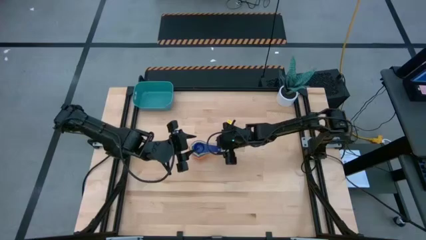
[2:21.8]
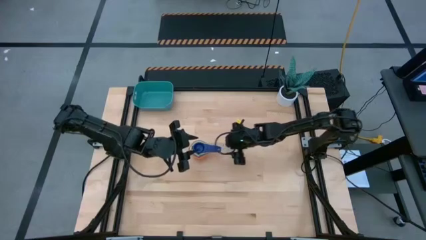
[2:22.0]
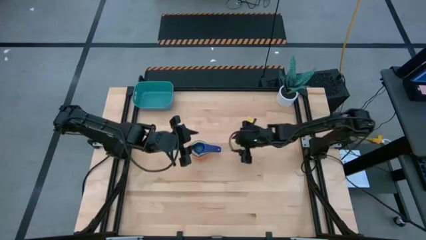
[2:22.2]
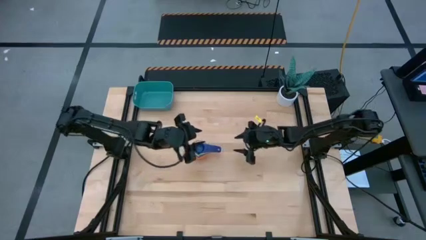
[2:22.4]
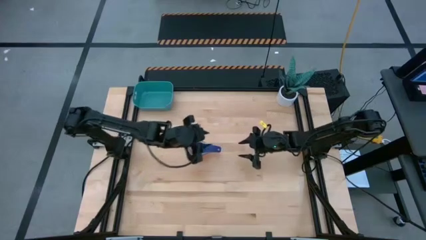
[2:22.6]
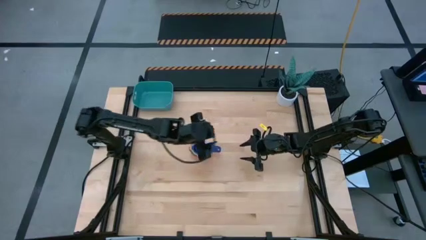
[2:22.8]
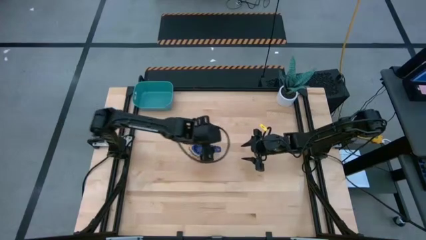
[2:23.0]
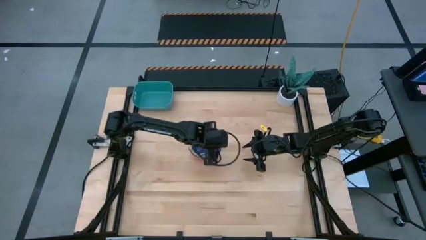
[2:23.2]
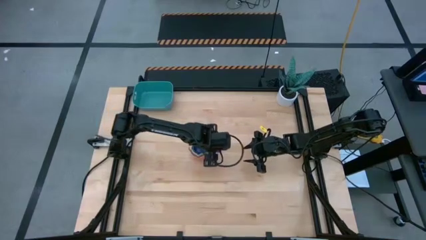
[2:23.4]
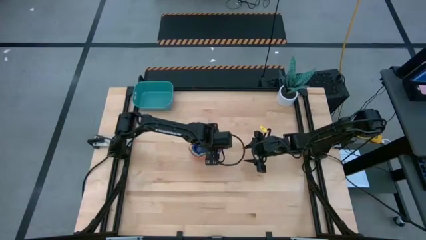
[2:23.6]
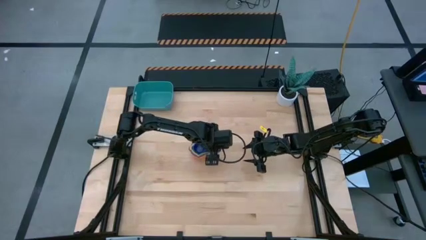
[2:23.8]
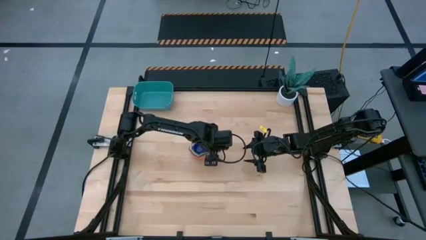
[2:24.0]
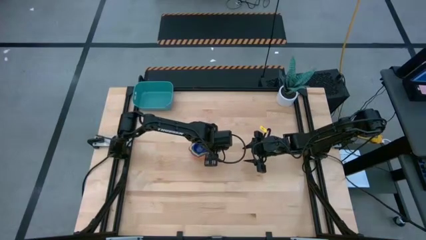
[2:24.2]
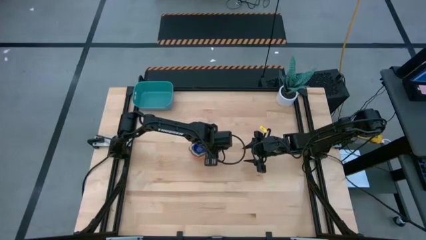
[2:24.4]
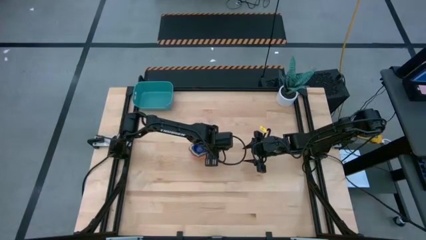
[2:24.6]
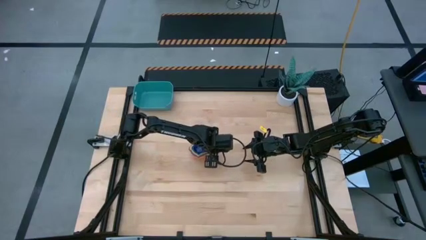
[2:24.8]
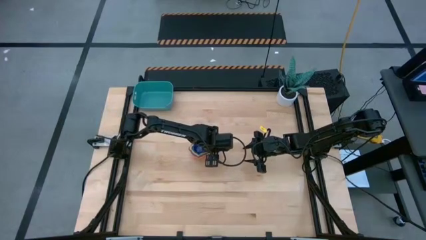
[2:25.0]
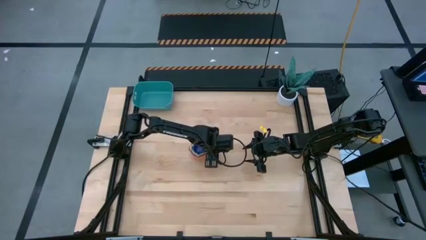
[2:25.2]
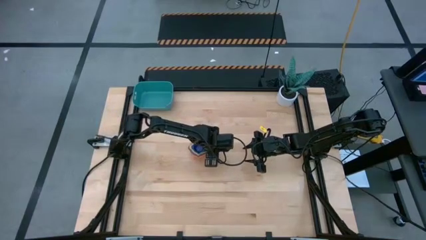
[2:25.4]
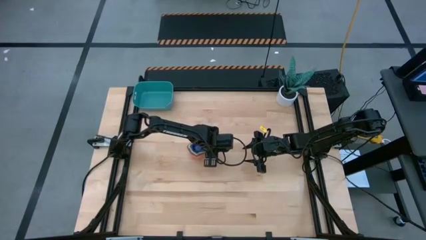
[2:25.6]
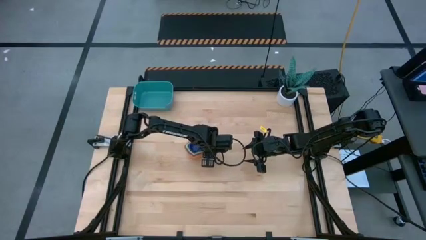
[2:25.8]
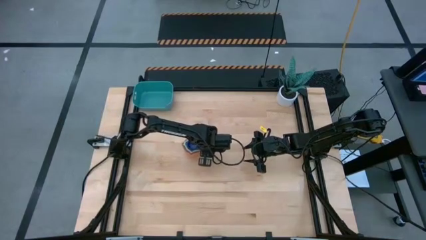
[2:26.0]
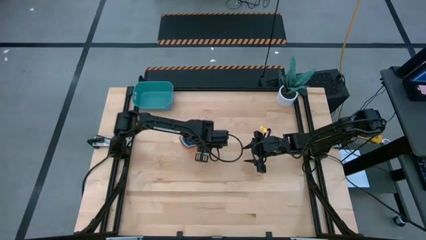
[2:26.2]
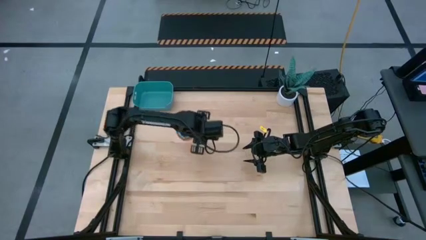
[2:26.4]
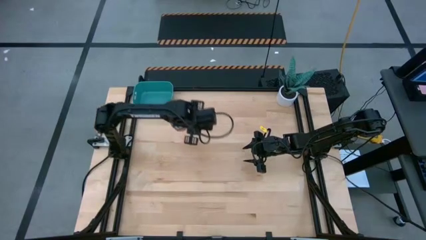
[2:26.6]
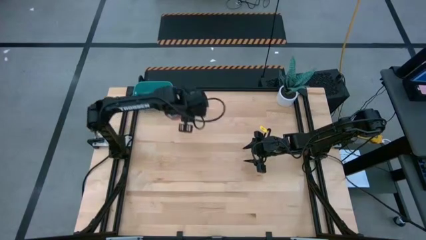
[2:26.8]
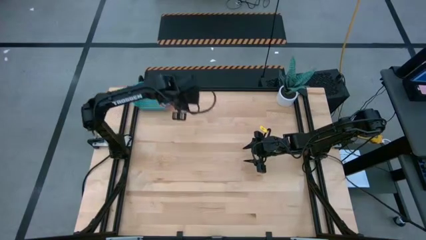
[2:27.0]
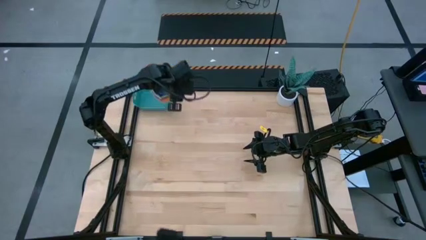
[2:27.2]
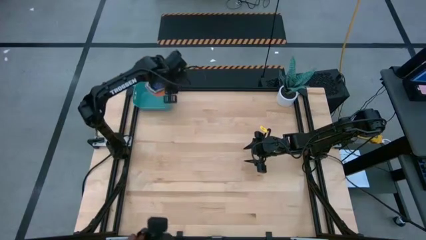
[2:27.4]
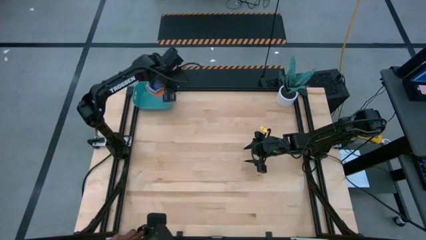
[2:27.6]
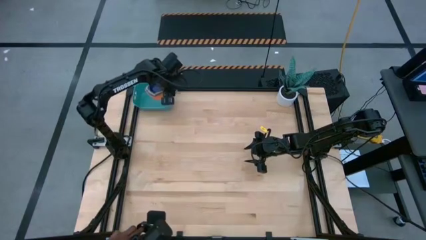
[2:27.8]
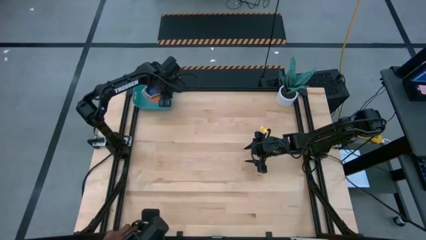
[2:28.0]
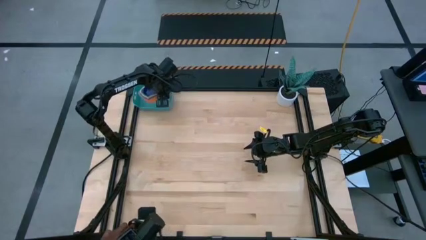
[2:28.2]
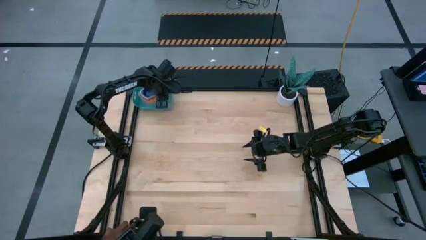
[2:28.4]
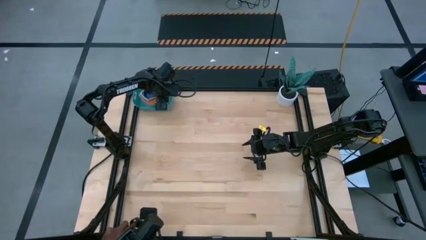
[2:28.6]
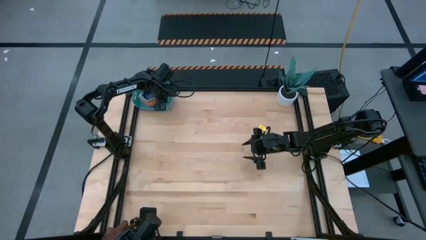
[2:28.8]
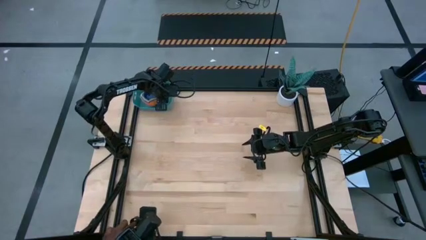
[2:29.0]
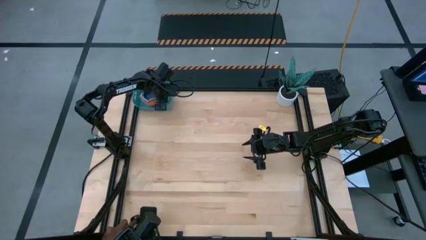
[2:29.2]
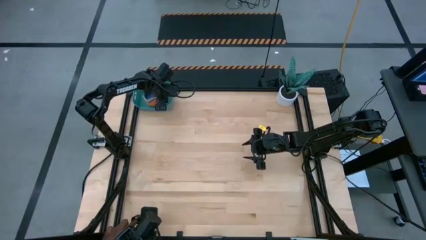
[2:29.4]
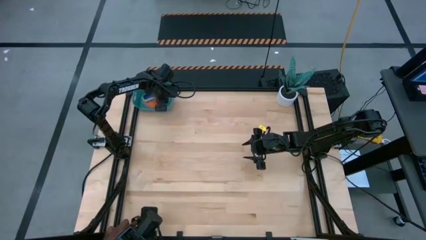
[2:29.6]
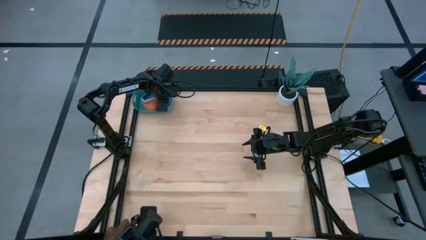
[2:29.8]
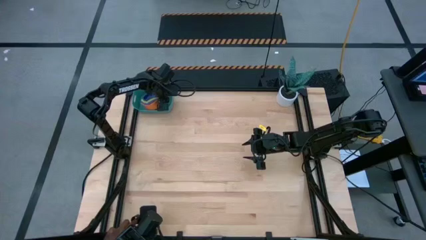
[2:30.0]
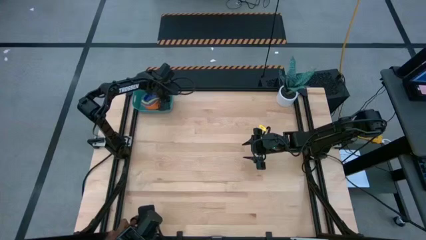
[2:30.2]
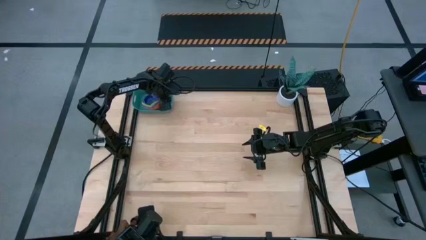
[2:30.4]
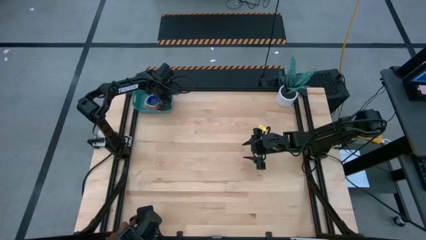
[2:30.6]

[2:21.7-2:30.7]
Task: Nest measuring cups in basket
Put the stacked measuring cups into the green bin

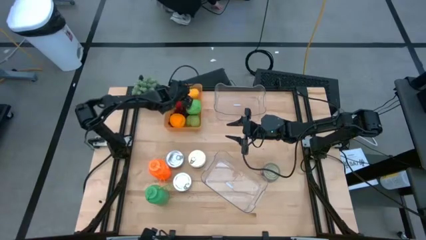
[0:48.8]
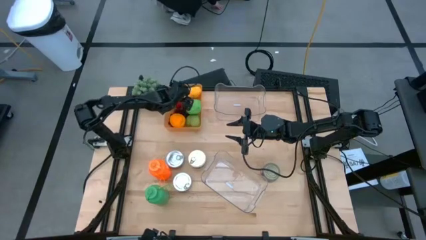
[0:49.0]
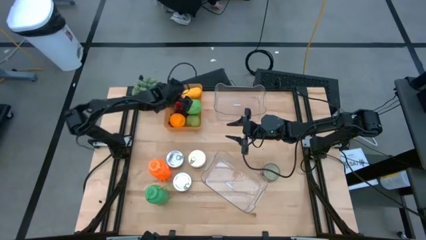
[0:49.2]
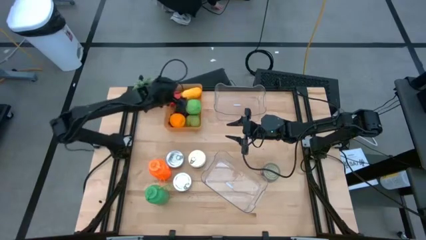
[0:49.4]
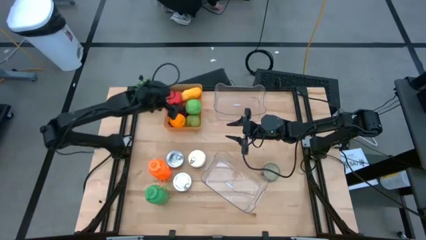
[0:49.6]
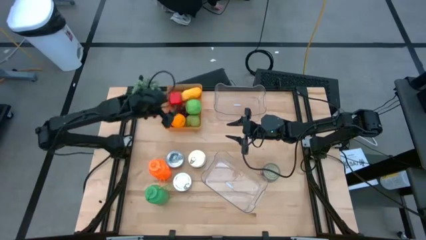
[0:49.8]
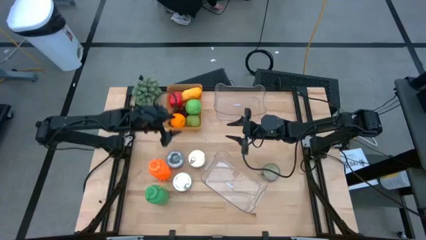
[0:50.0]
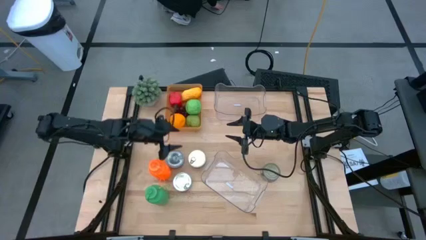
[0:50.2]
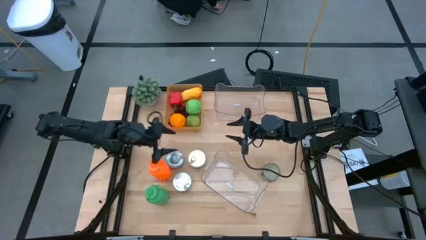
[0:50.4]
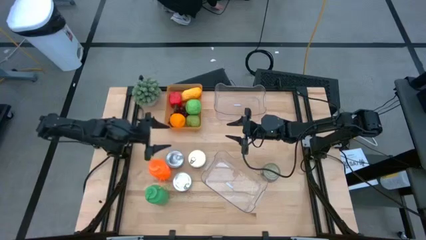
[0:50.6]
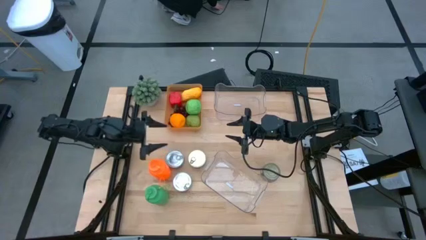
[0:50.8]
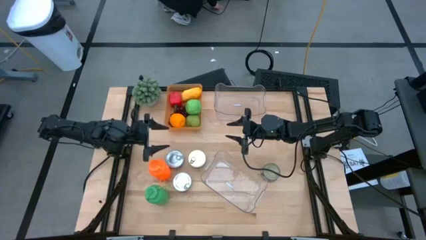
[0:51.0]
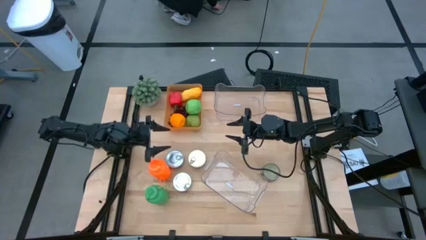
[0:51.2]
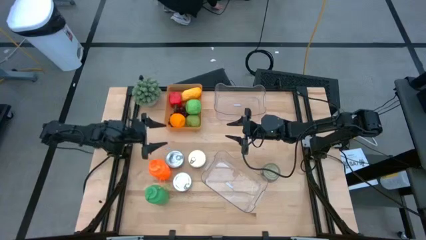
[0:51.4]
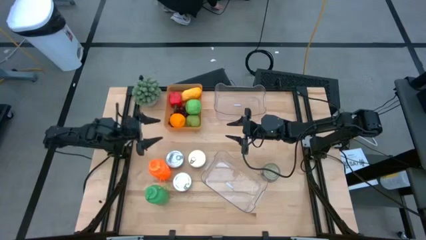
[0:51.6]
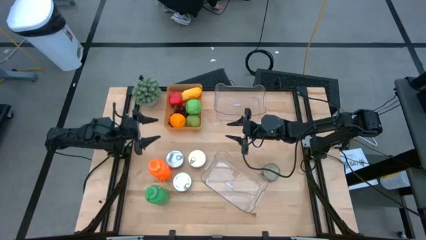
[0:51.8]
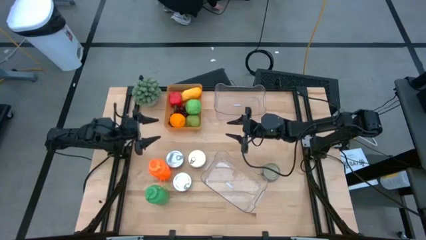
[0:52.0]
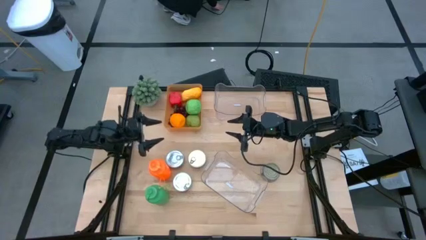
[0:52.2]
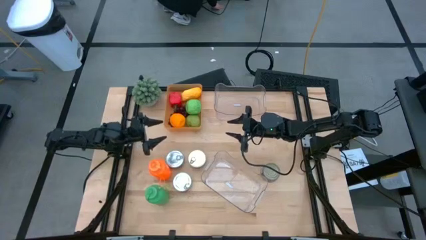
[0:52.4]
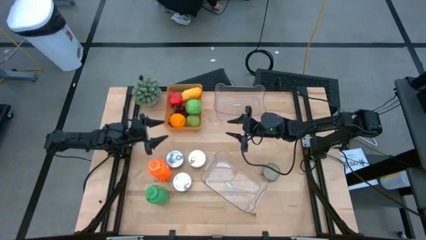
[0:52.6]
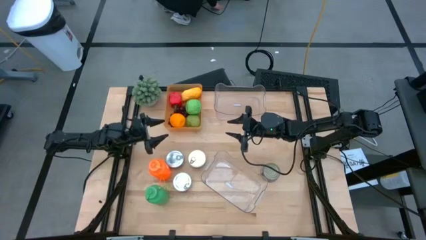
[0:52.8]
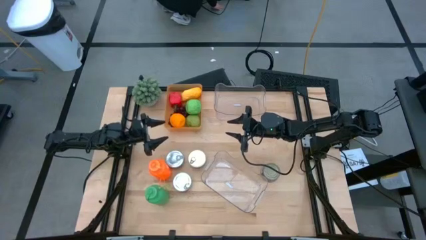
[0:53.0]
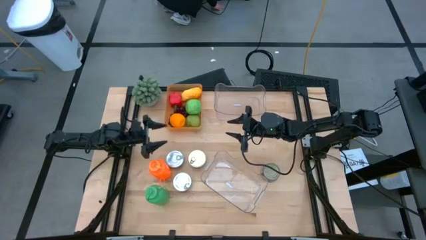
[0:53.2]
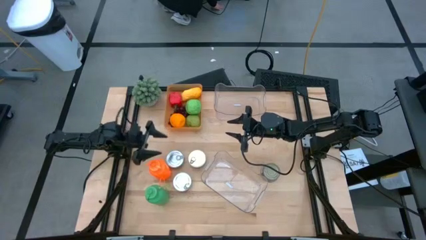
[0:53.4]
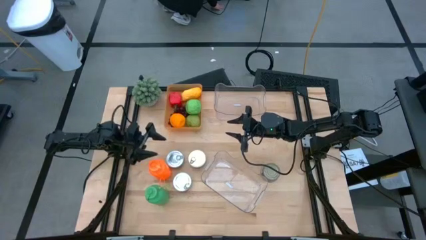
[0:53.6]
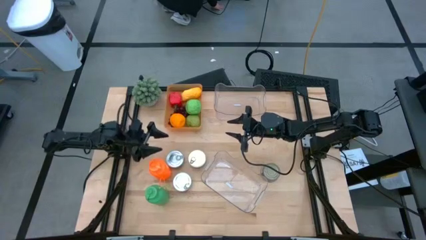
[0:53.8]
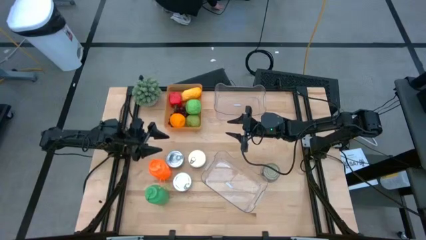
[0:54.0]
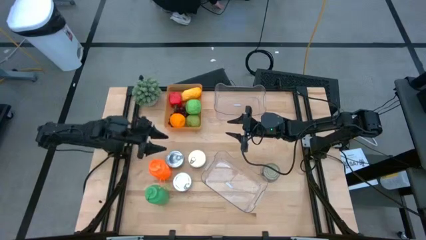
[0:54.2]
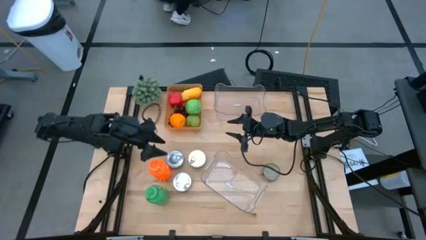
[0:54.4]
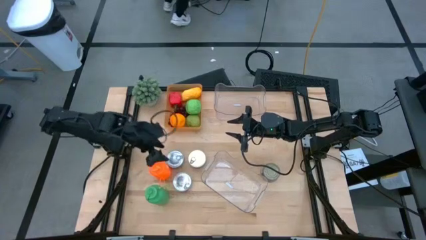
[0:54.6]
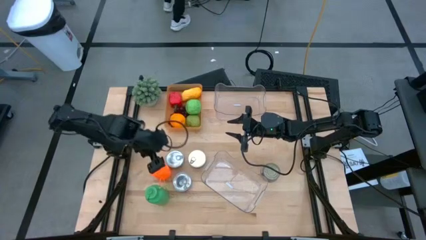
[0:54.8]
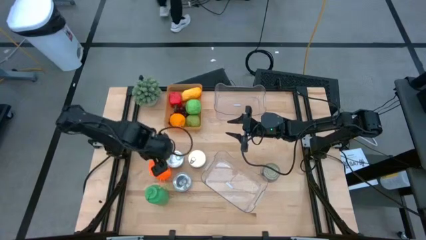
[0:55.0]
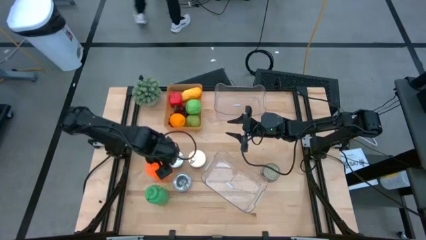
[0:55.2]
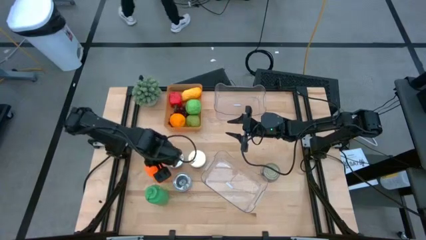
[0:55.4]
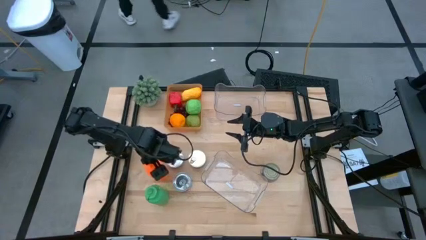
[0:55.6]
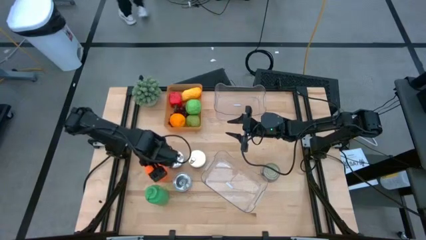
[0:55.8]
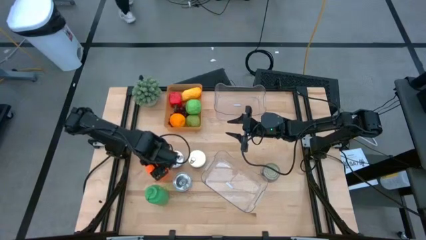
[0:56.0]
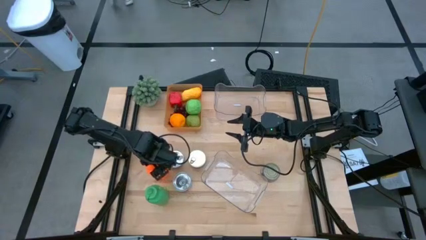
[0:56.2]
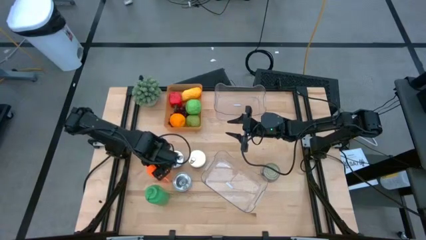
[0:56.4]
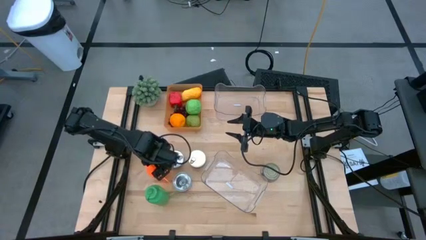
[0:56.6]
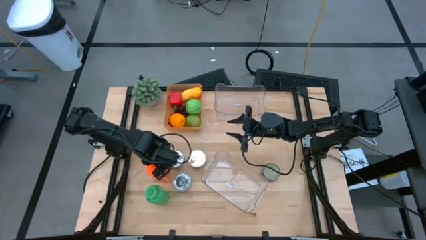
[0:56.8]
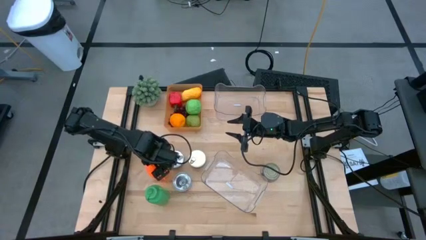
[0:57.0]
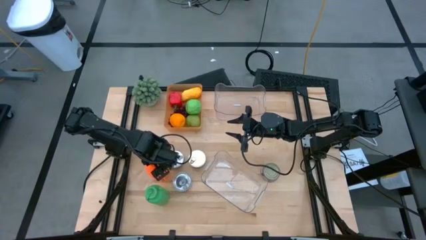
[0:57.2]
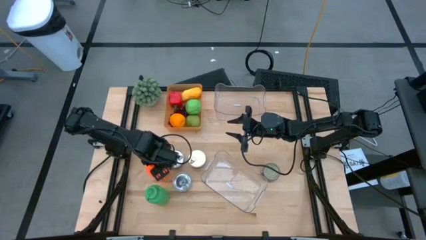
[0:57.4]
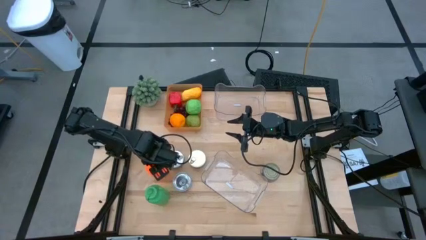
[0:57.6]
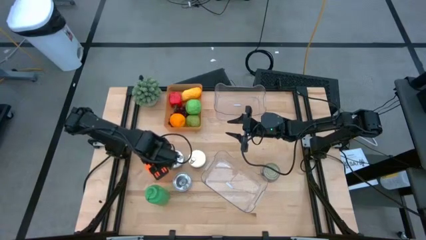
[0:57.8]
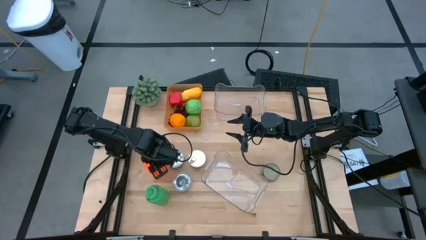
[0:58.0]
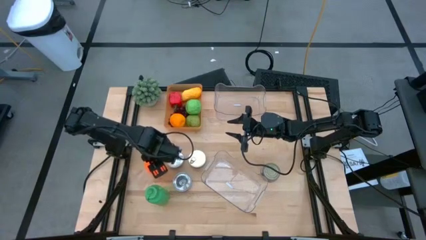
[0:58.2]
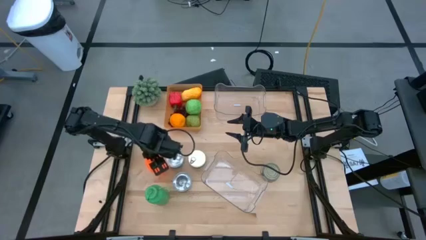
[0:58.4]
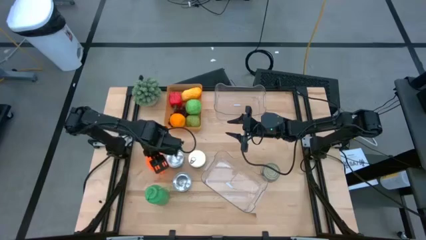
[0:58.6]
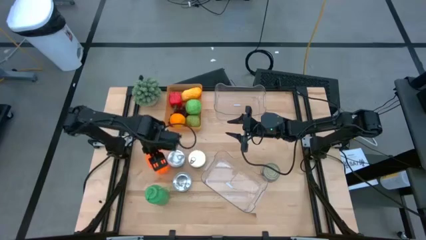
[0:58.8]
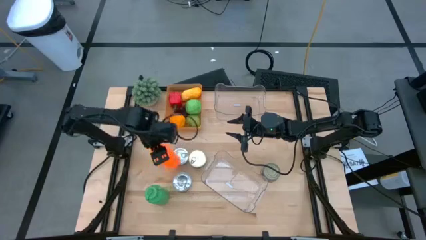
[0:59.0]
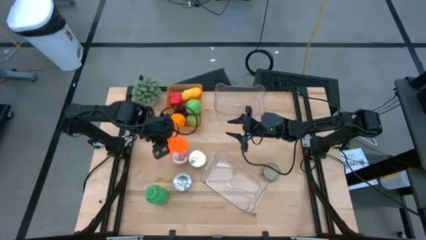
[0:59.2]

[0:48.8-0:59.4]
Task: Pick & Place Food Item
Put the orange water bottle into the top transparent bin
